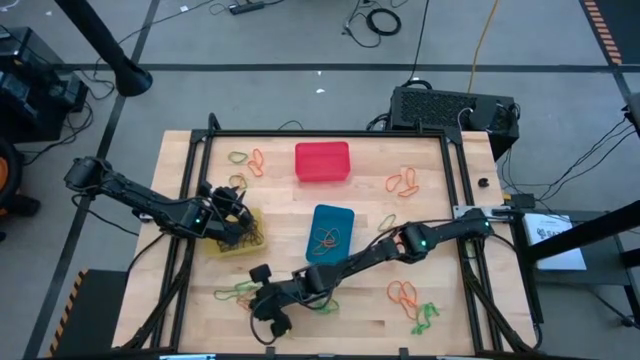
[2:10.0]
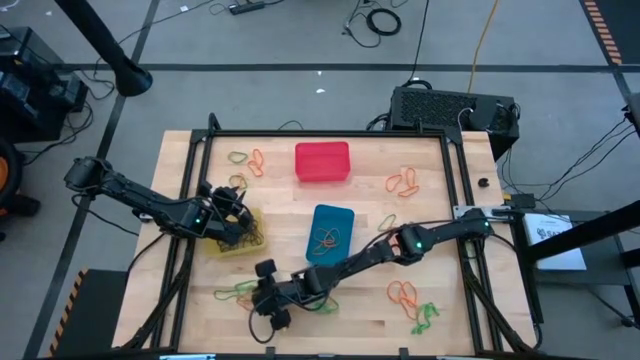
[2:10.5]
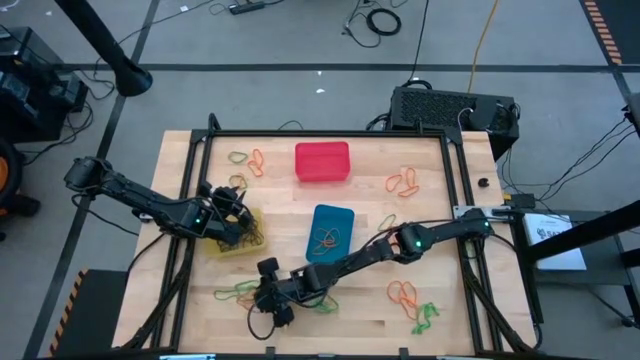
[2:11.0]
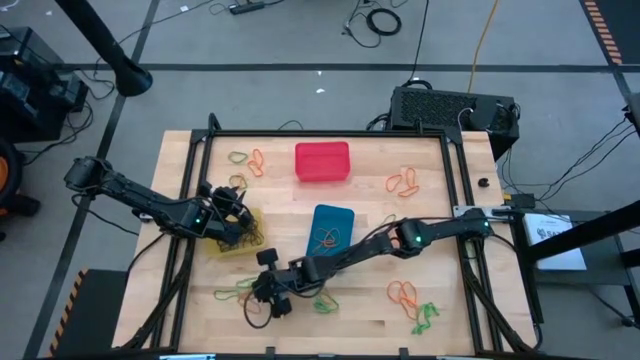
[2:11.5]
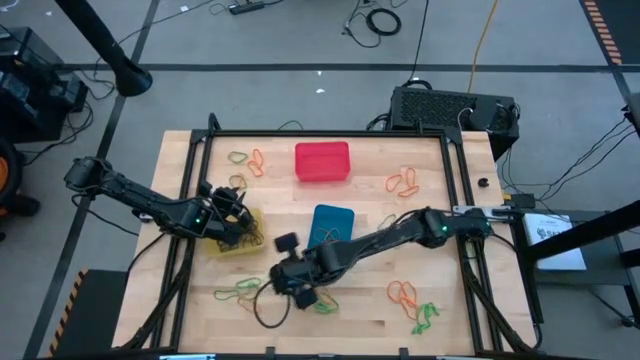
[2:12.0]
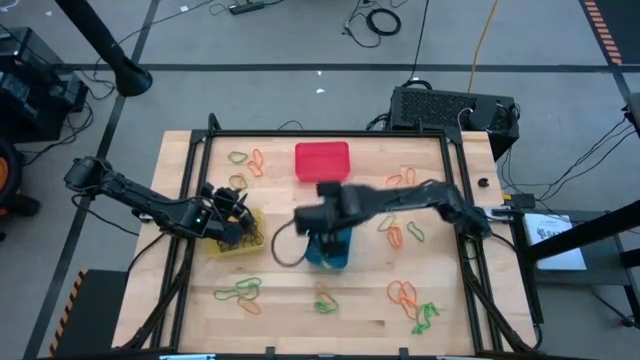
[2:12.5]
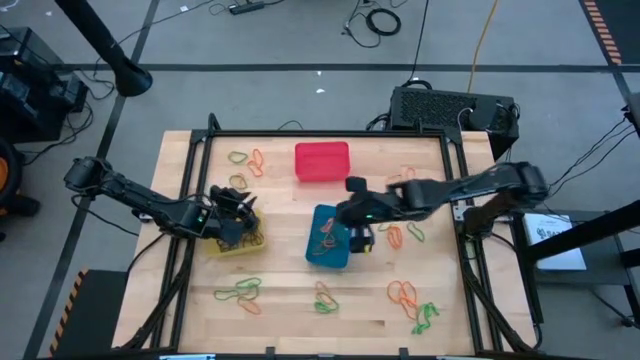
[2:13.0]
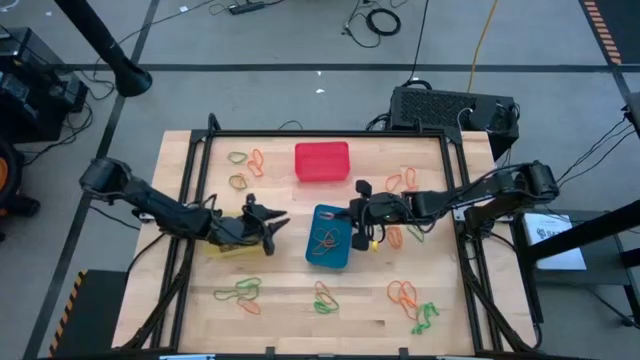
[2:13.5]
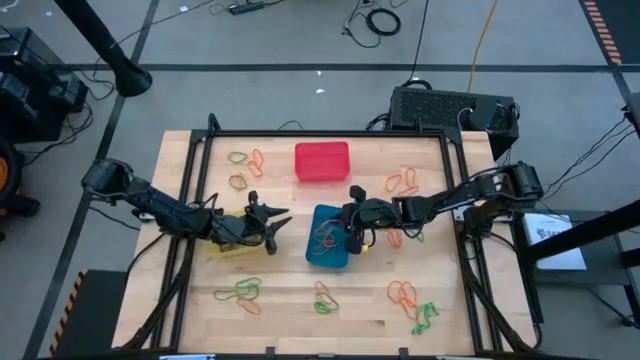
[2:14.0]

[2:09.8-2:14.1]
Task: Sort rubber bands into baskets
Put the orange rubber band into the blue bin

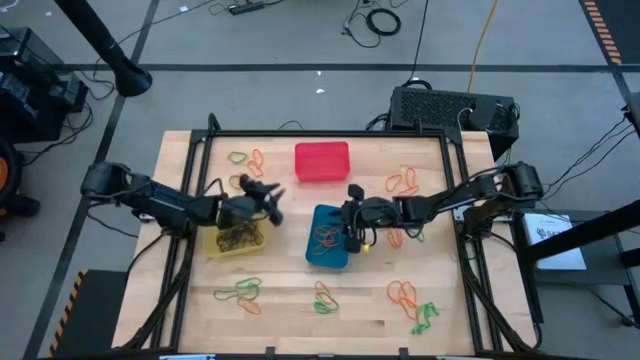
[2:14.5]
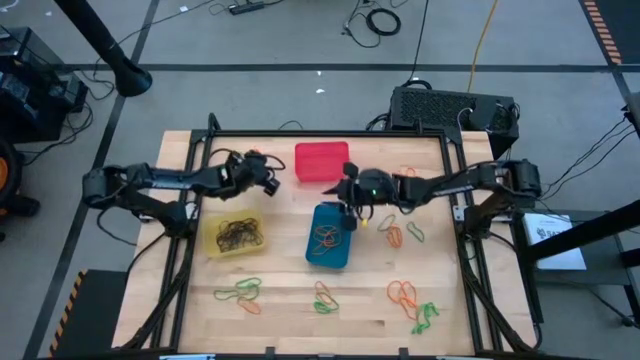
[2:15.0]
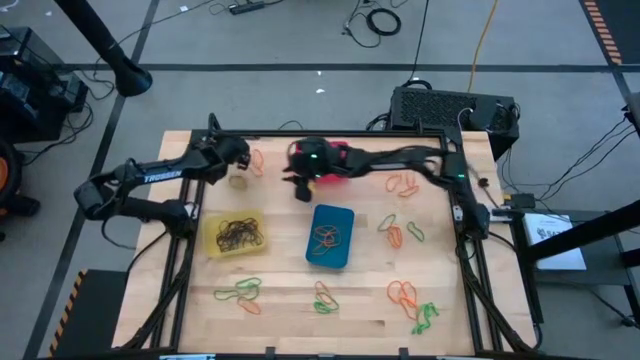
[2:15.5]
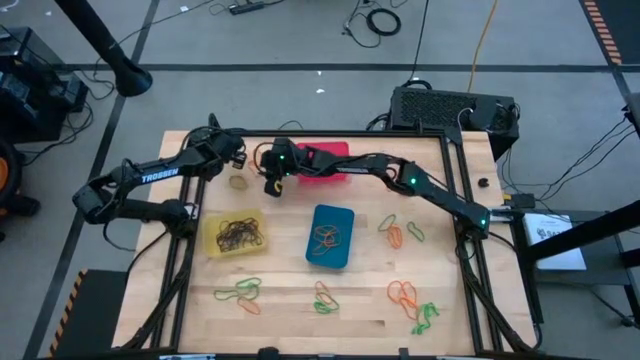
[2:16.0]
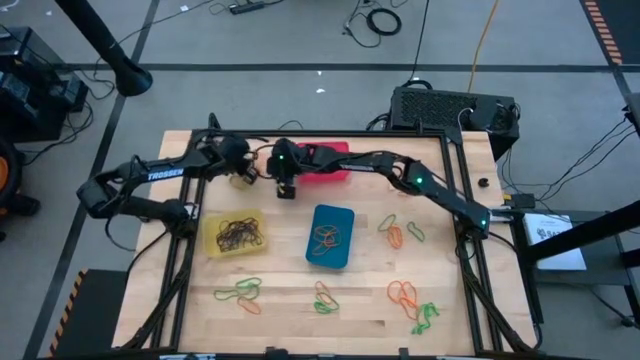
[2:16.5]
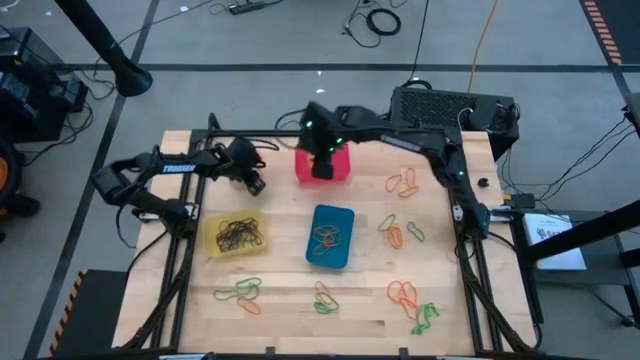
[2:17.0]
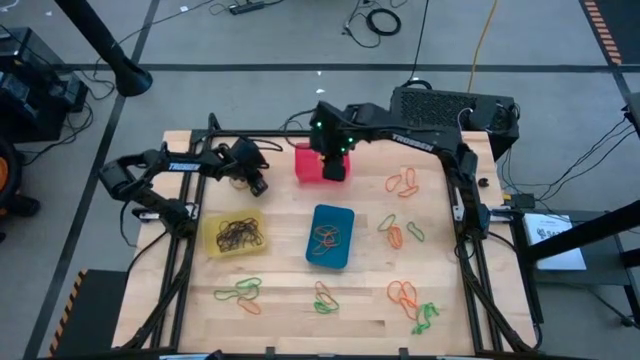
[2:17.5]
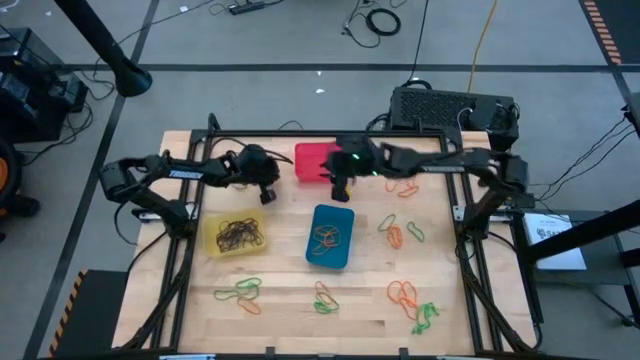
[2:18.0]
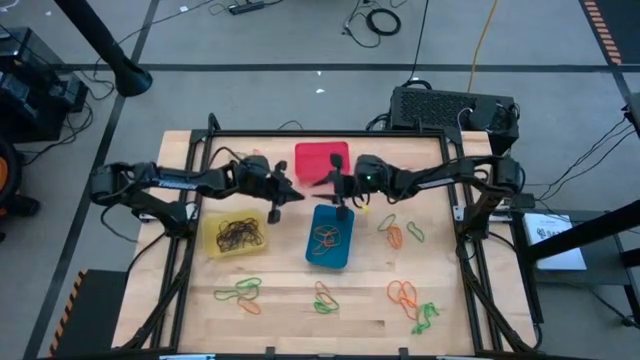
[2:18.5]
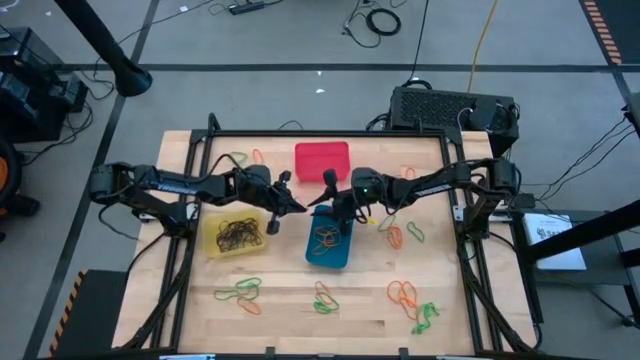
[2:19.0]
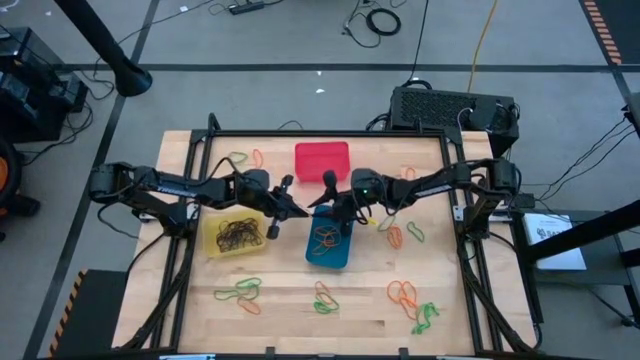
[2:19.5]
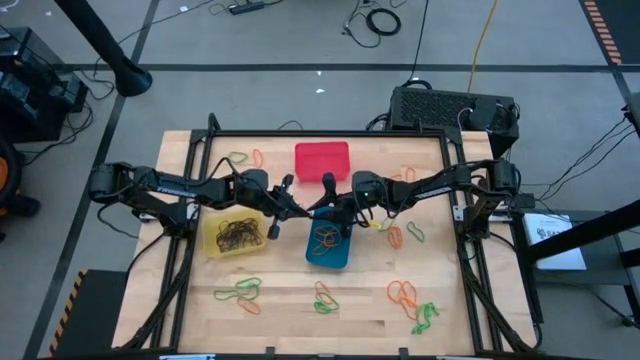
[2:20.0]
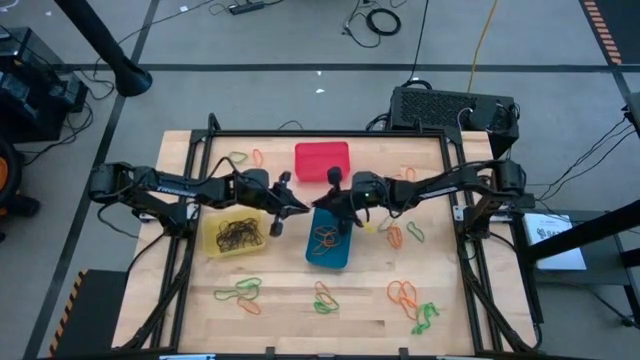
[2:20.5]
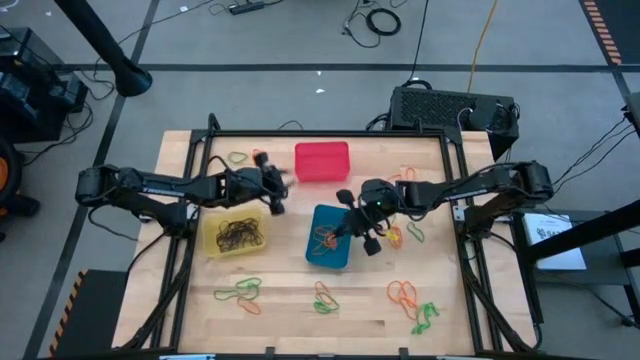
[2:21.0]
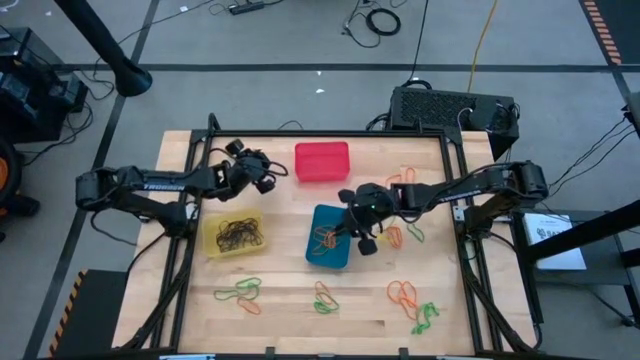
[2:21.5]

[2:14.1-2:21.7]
Put the orange rubber band into the blue bin

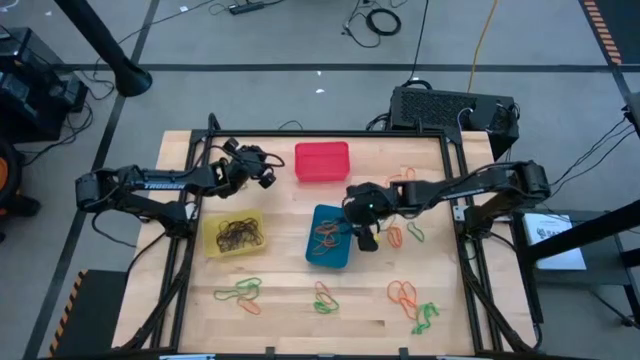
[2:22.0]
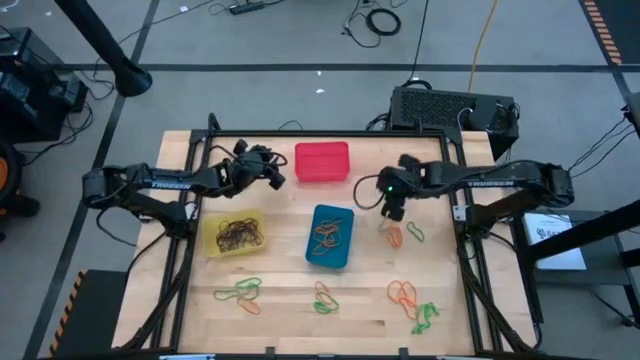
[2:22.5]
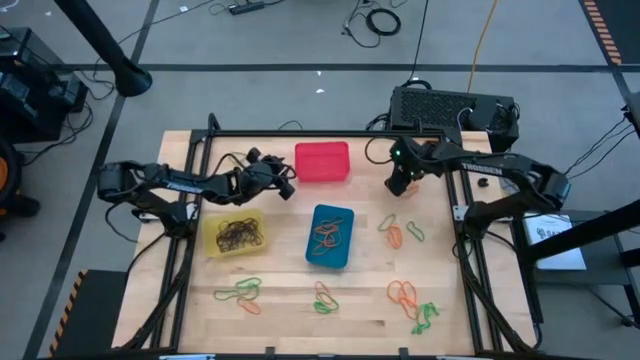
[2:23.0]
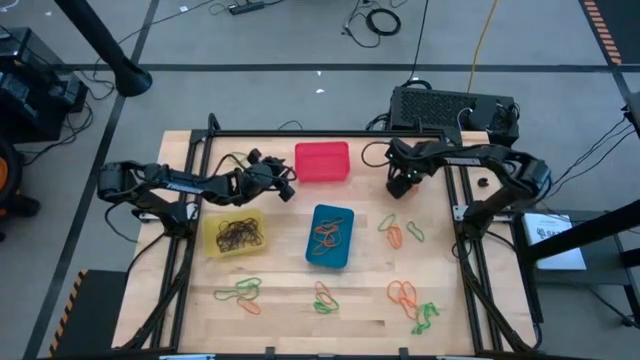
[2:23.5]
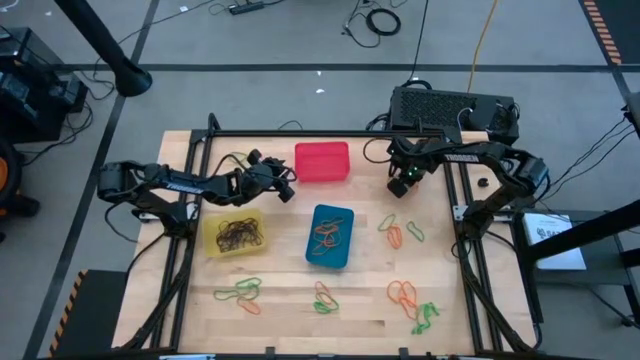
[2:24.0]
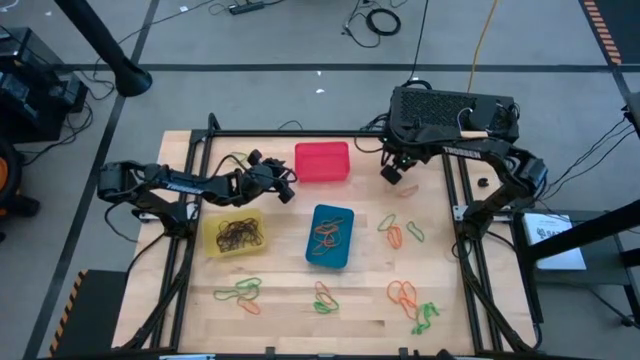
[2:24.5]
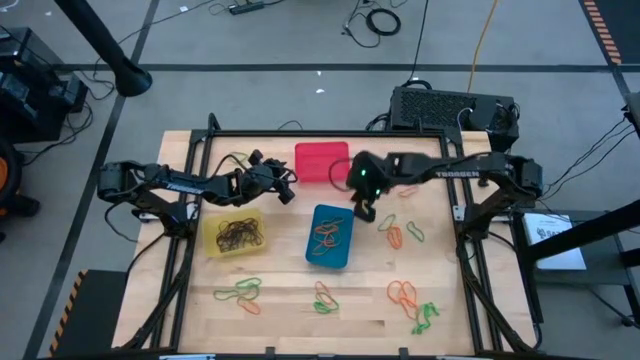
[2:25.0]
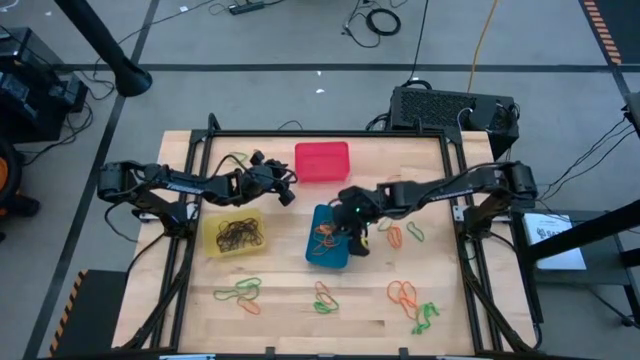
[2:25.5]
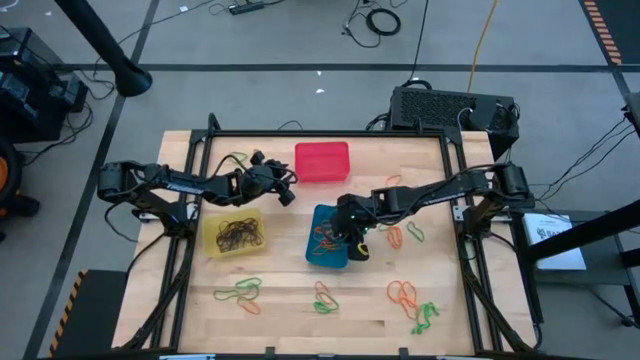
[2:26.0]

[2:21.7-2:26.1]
Put the orange rubber band into the blue bin

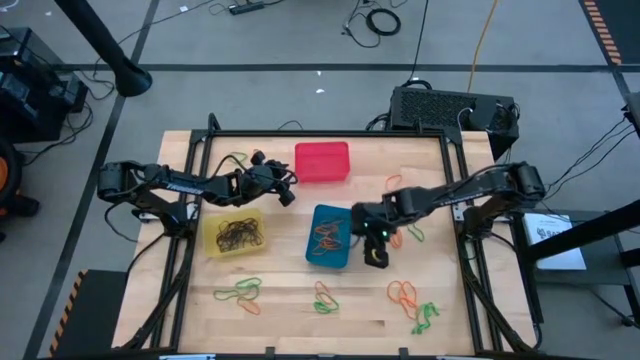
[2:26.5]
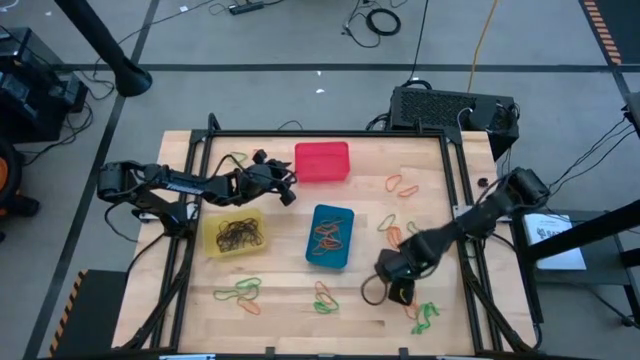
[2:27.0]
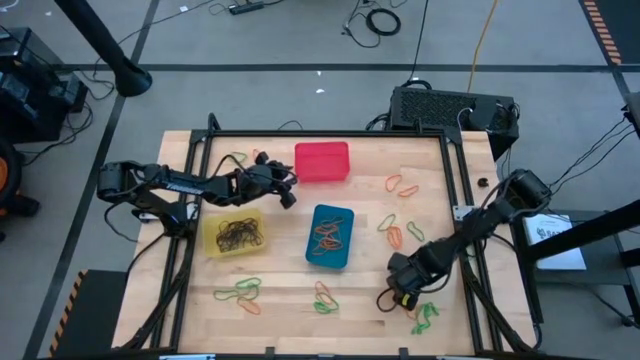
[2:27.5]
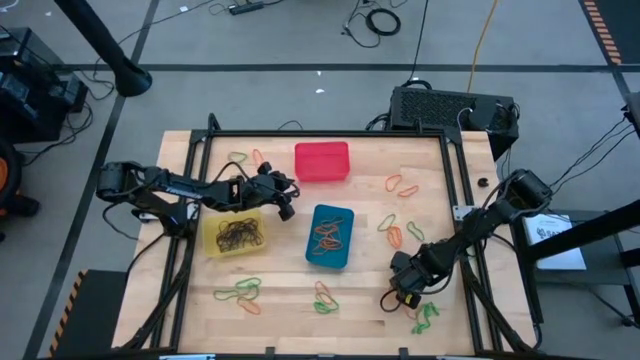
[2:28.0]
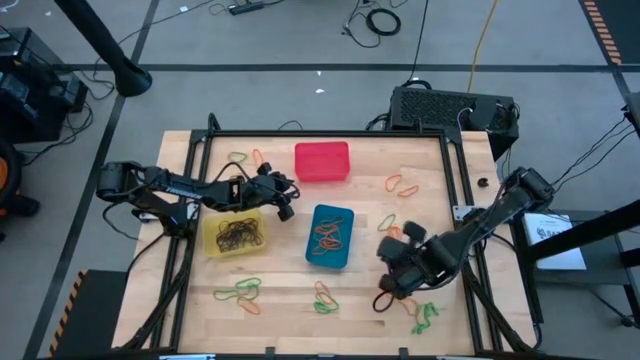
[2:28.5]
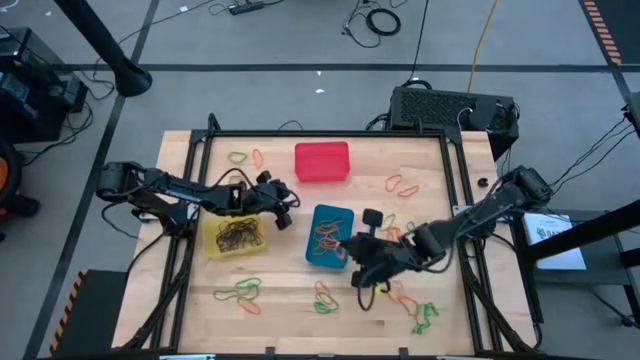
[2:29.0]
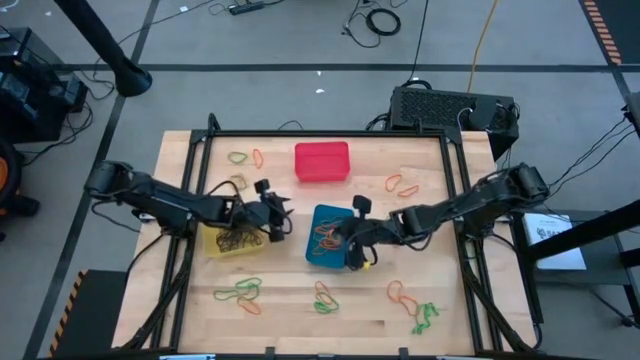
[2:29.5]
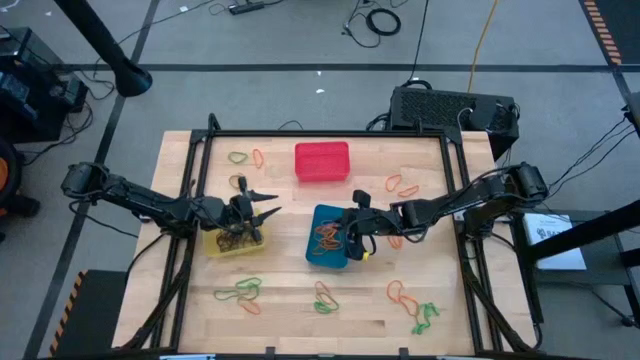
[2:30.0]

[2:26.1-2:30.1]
Put the orange rubber band into the blue bin

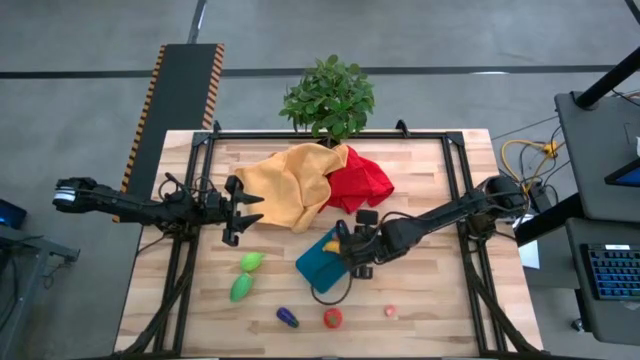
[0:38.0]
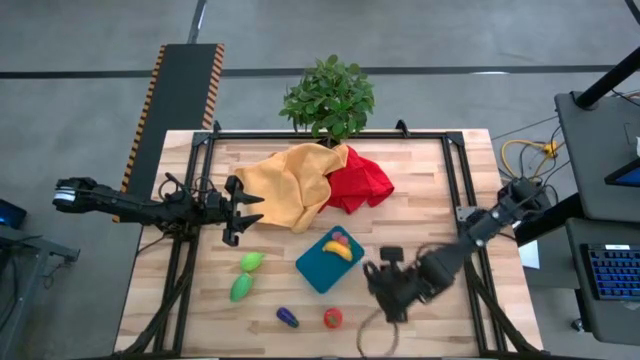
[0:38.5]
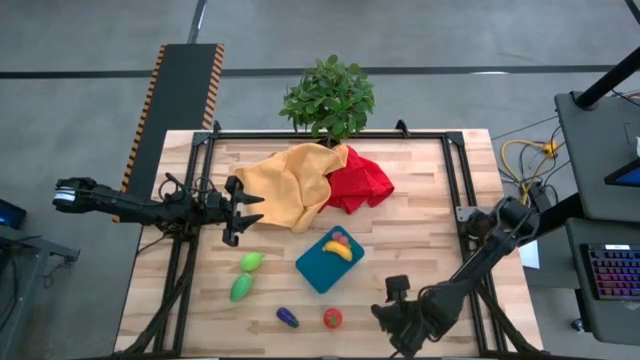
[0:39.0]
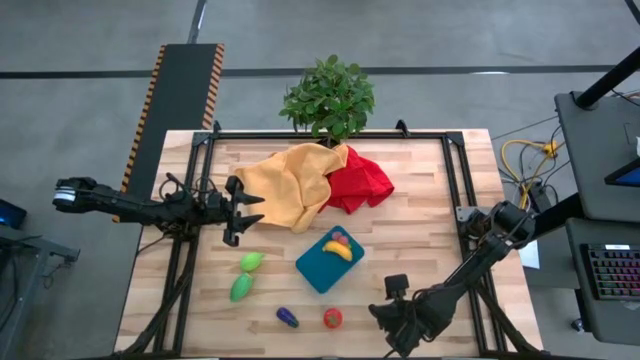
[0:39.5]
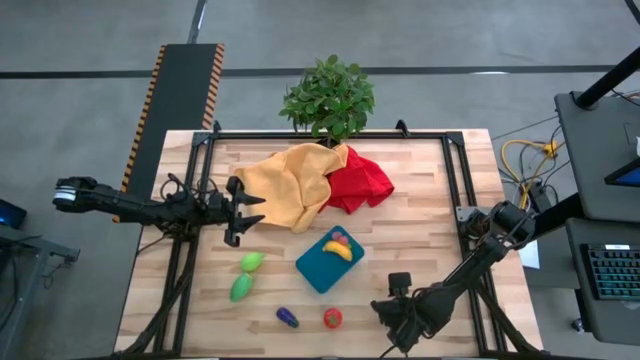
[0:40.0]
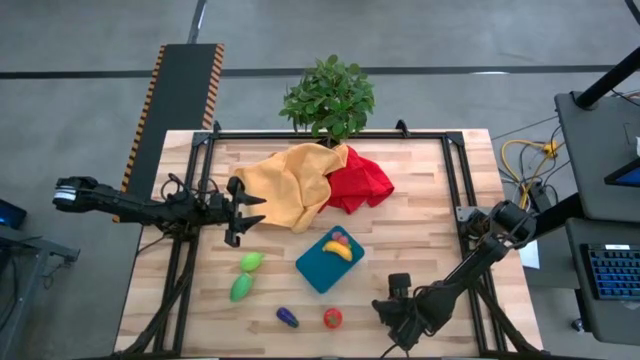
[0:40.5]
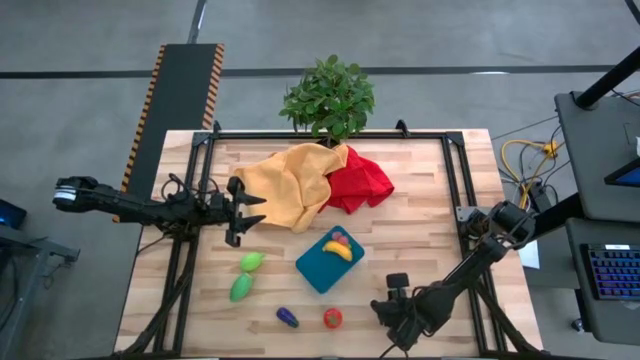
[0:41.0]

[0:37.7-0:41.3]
Task: Pick and placing Produce into tupperware
Put the pink peach into the blue bin
